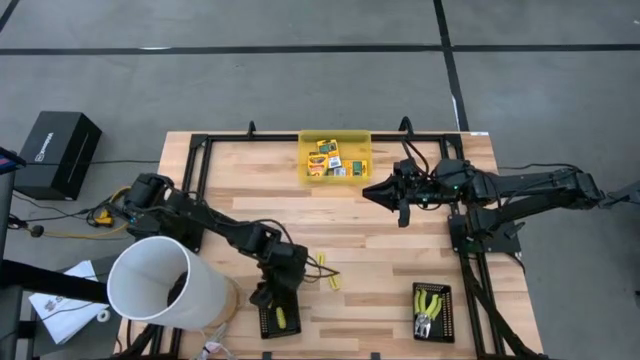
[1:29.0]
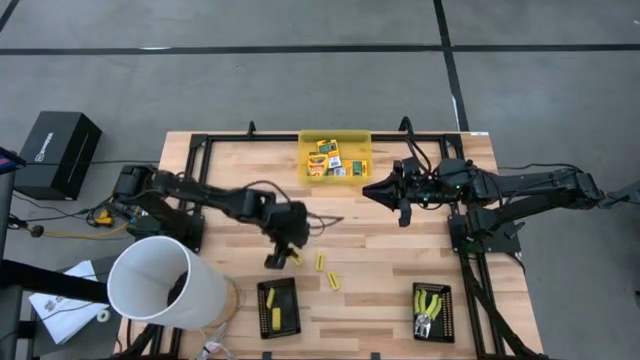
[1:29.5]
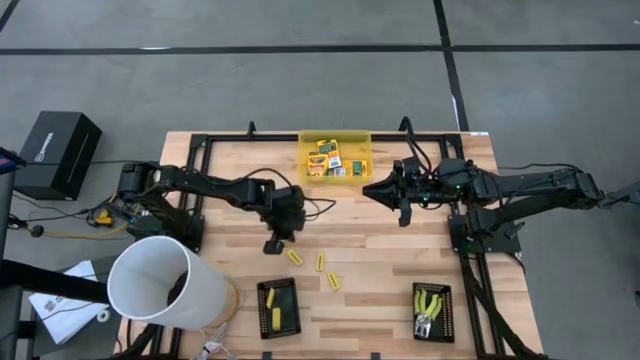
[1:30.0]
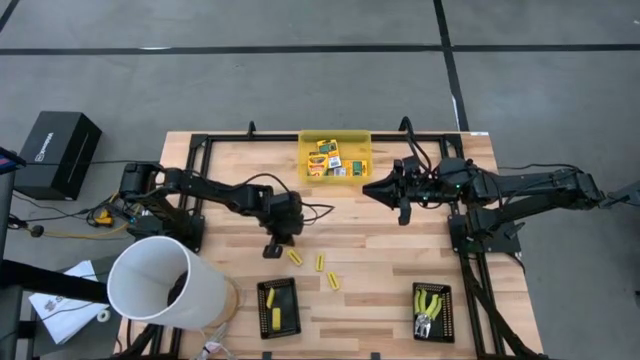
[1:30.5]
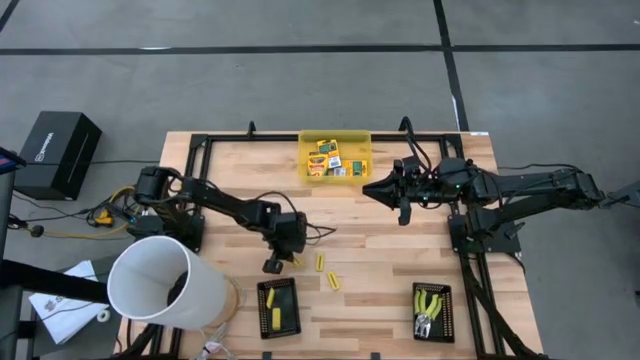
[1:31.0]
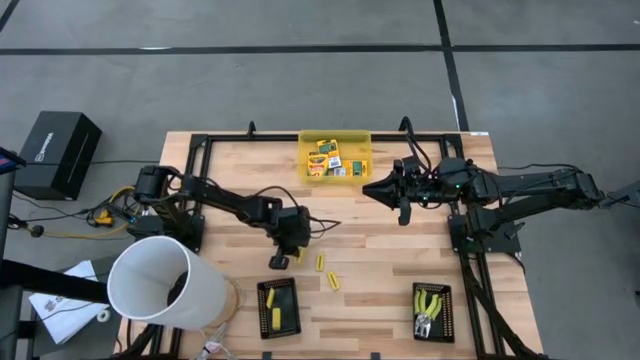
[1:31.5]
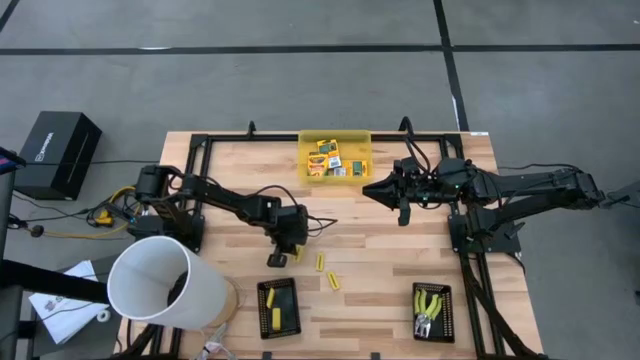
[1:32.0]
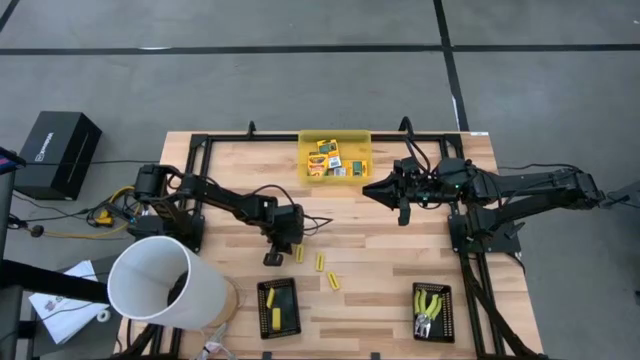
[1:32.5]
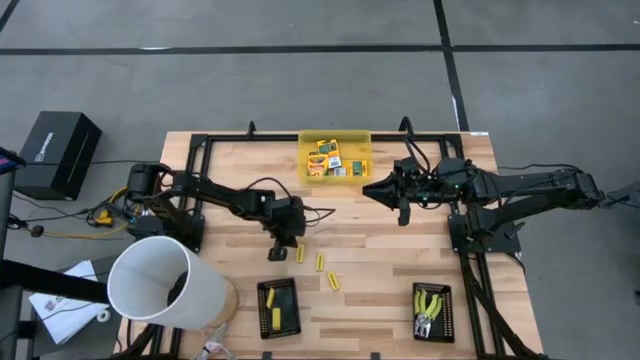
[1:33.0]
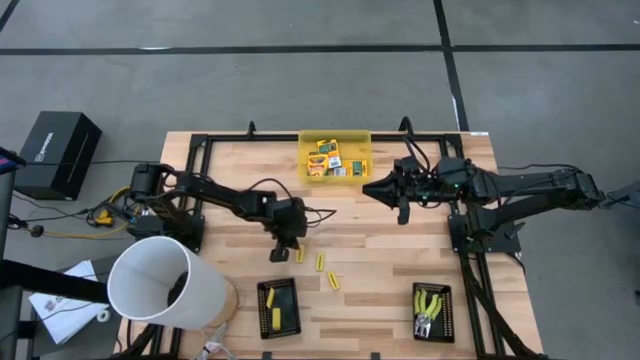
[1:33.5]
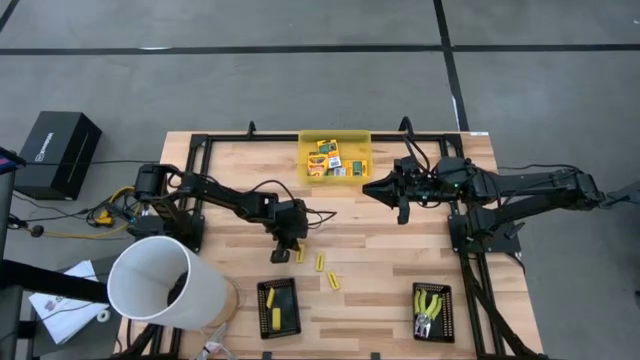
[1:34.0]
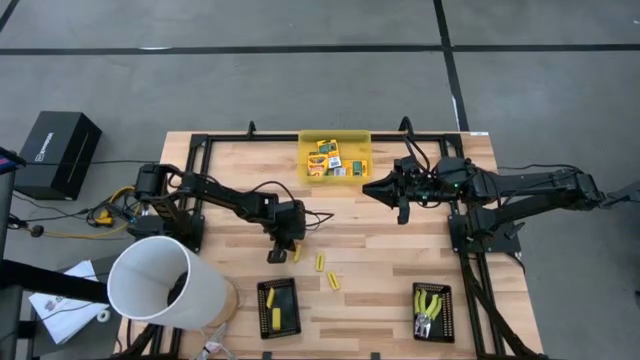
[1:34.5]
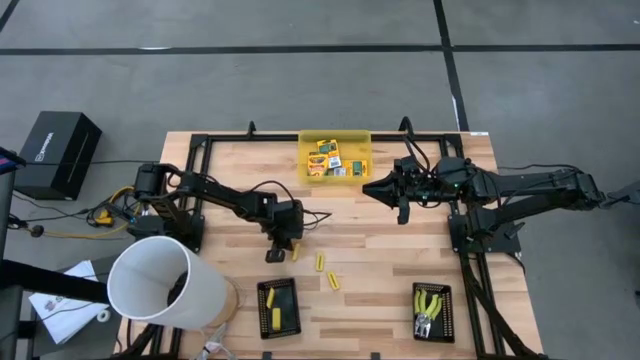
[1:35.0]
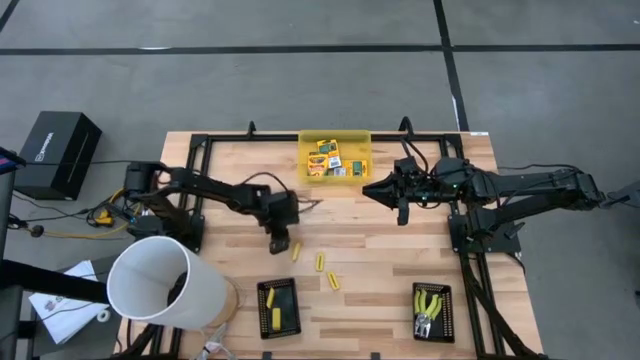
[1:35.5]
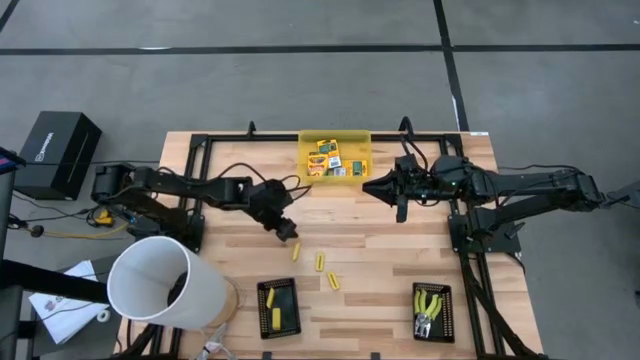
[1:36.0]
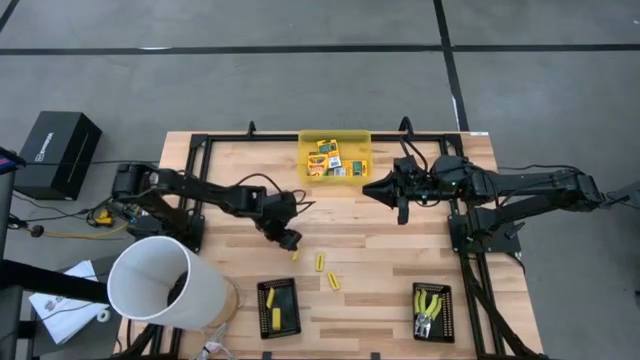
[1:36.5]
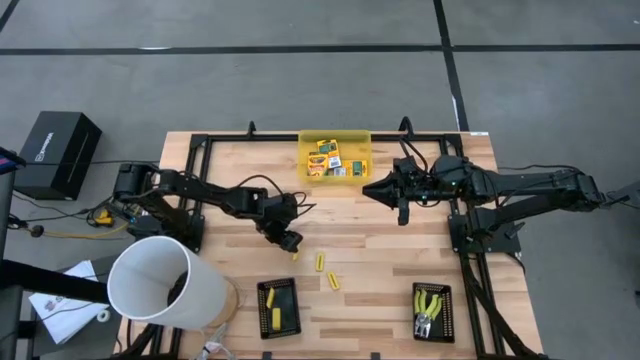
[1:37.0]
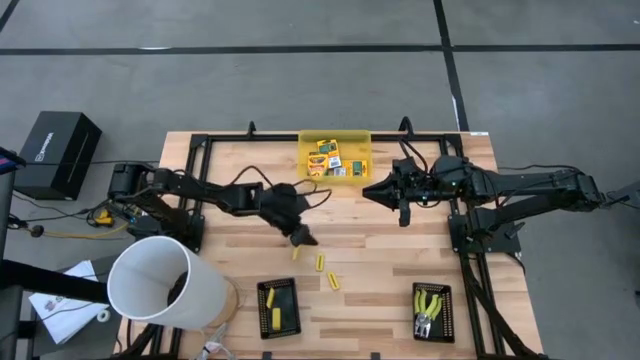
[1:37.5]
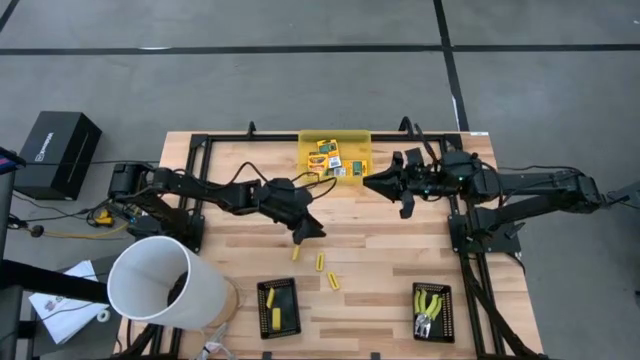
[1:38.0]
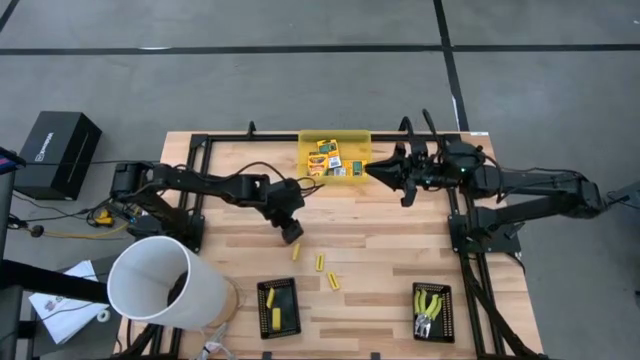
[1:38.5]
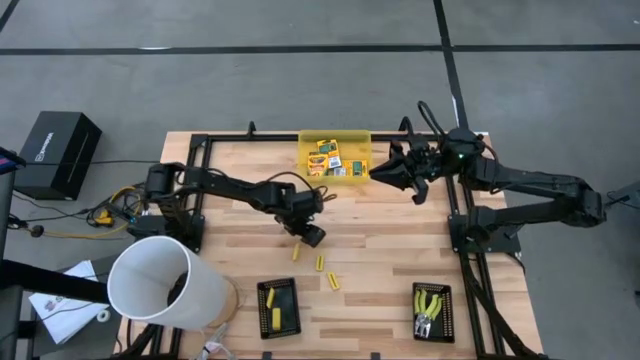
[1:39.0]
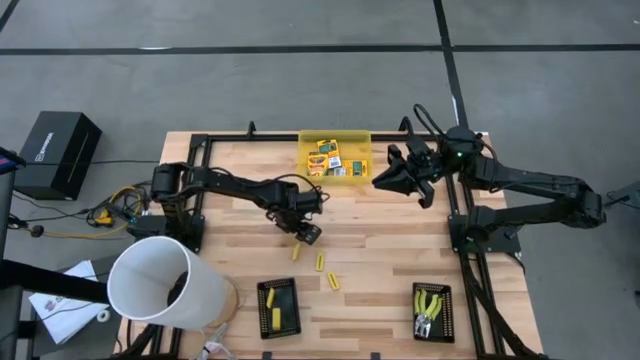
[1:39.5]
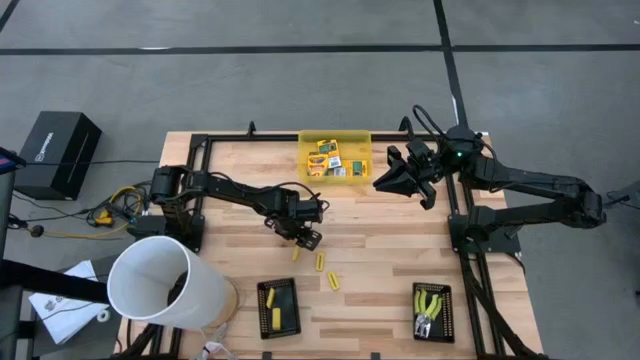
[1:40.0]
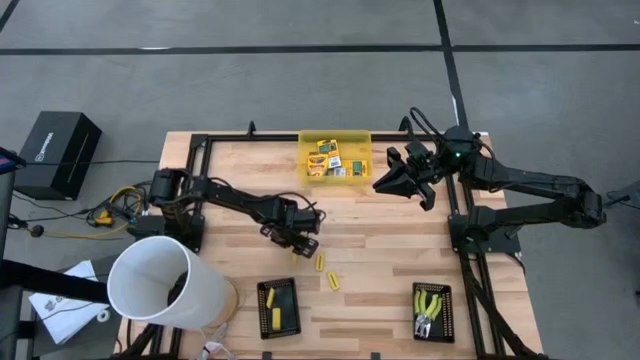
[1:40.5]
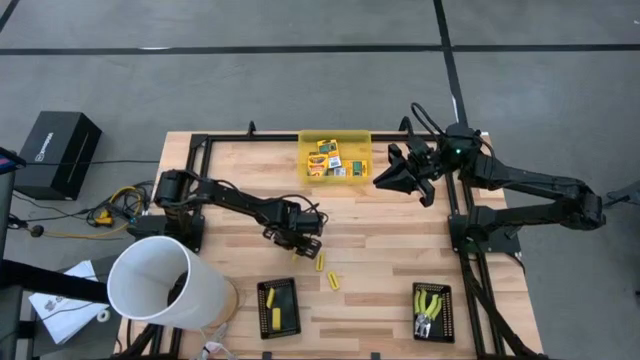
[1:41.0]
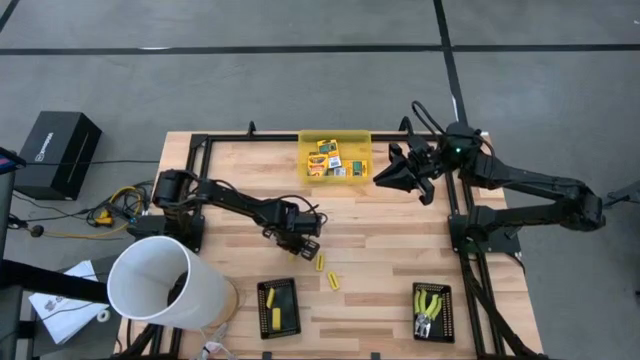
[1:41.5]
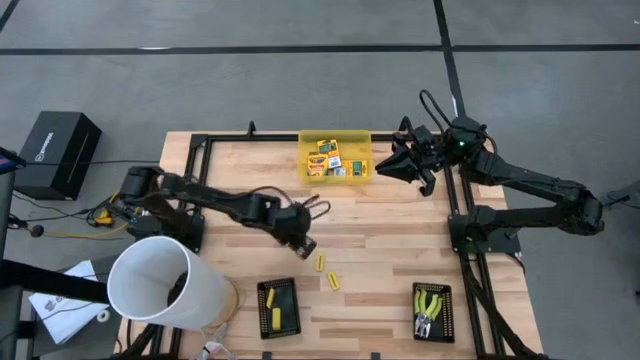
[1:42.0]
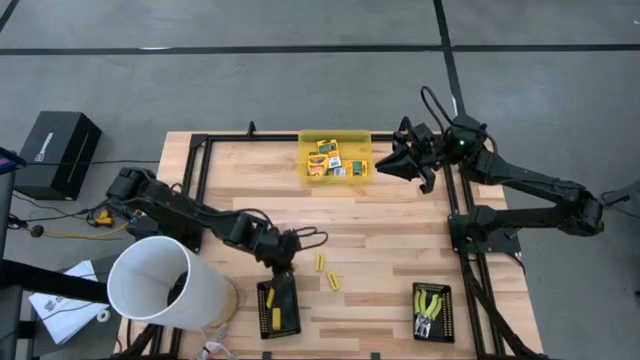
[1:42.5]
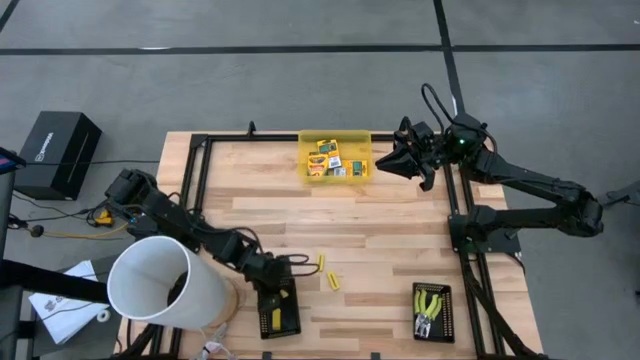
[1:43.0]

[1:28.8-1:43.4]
Task: Pick & Place School Supplies
Put the yellow eraser into the left black bin

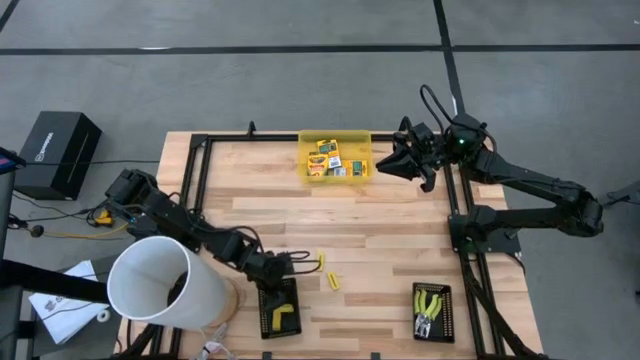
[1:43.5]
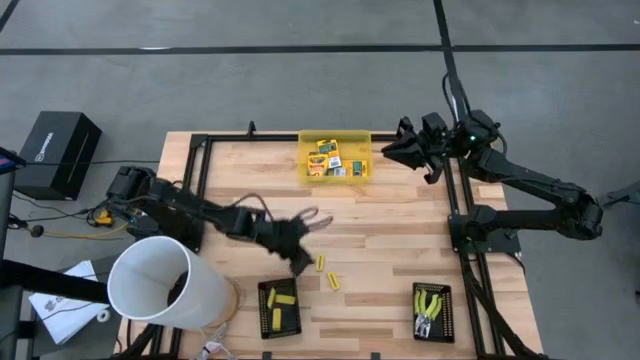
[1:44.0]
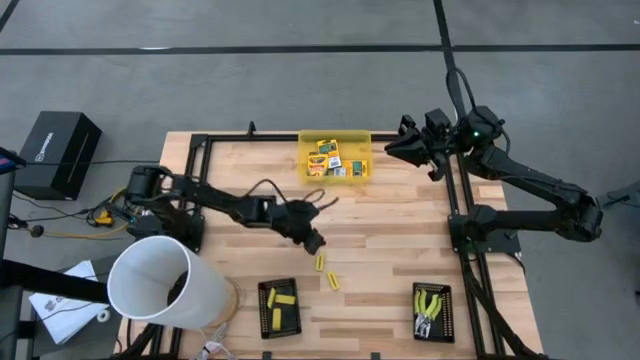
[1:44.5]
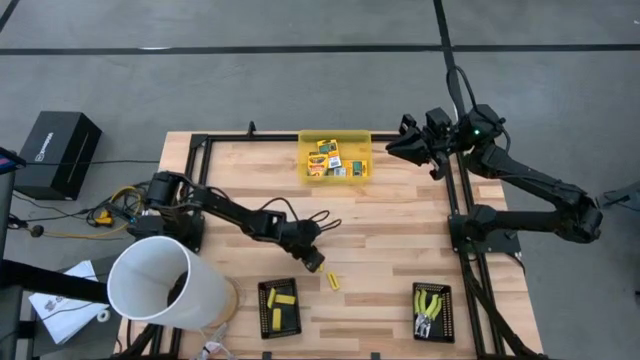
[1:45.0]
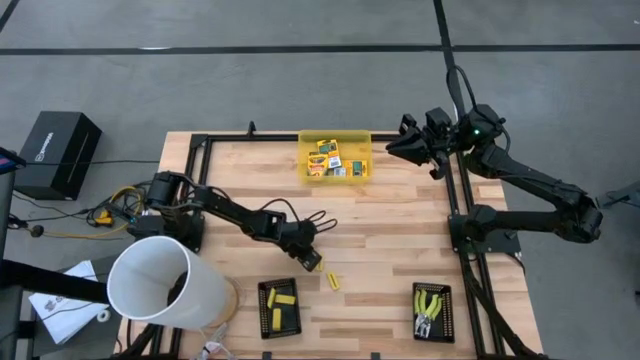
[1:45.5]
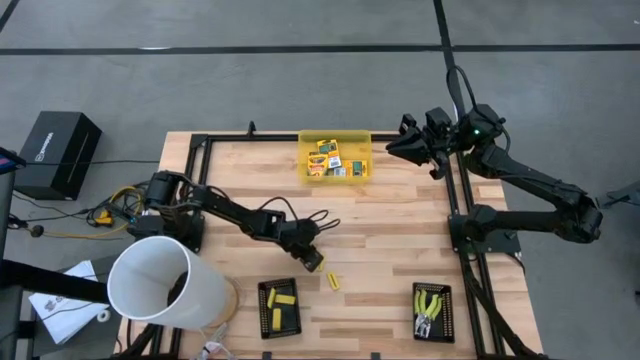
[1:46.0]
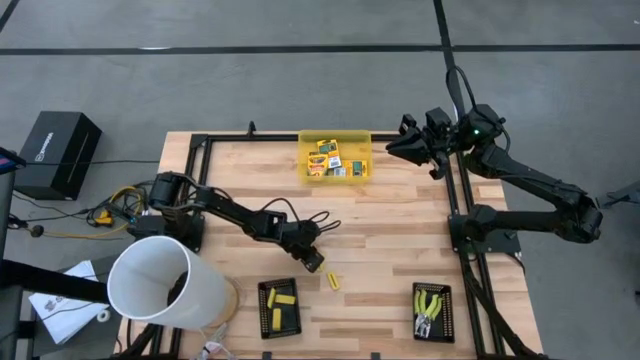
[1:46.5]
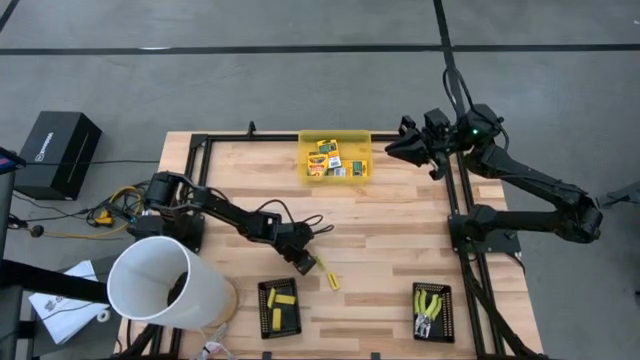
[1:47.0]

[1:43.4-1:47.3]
Put the yellow eraser into the left black bin

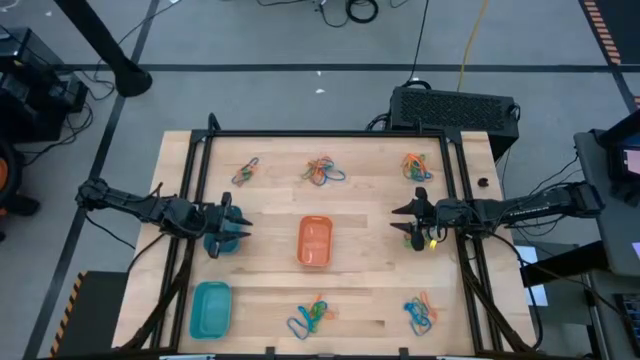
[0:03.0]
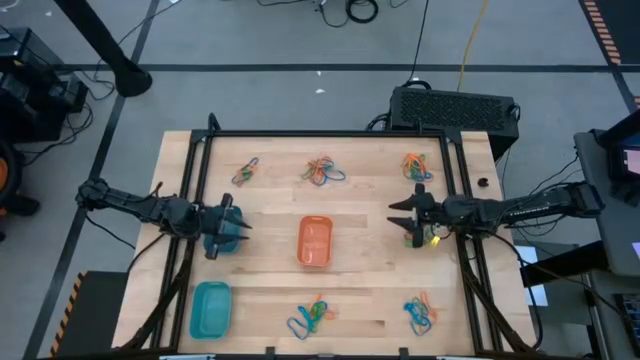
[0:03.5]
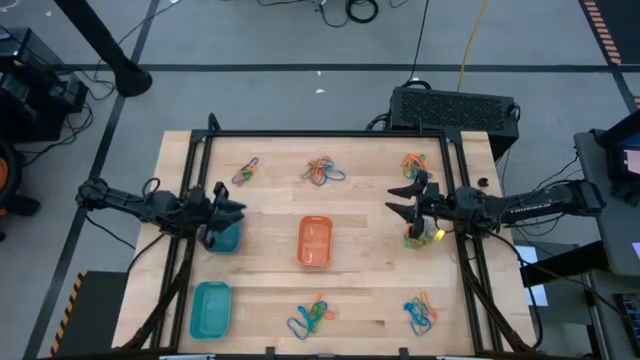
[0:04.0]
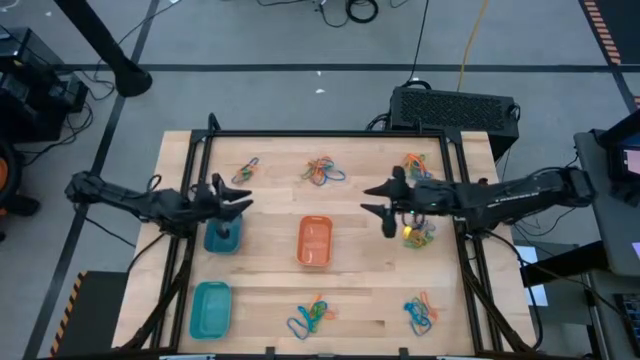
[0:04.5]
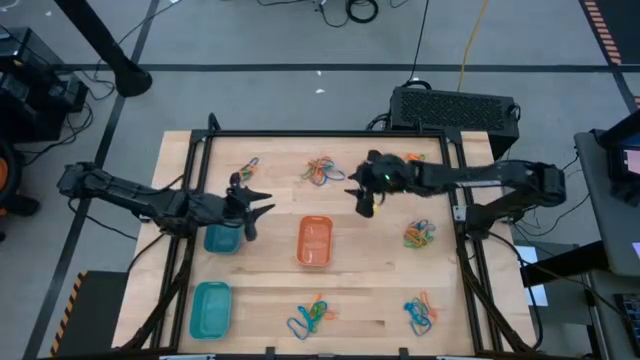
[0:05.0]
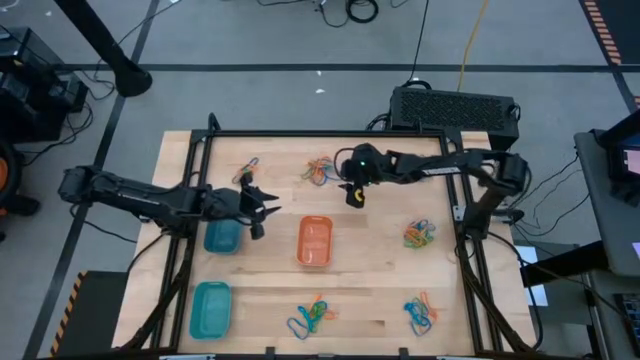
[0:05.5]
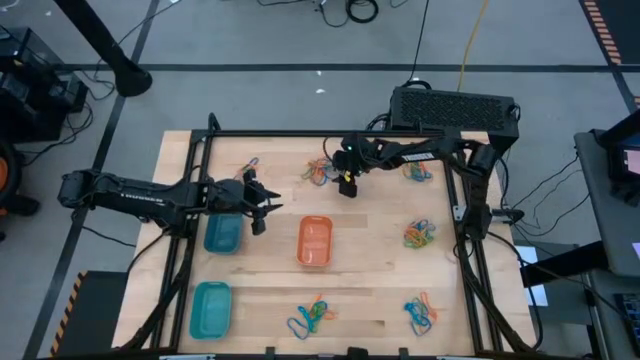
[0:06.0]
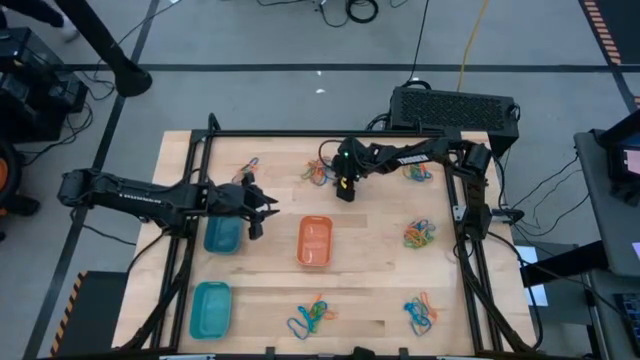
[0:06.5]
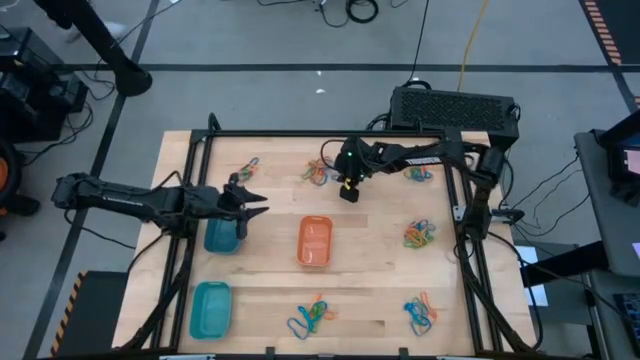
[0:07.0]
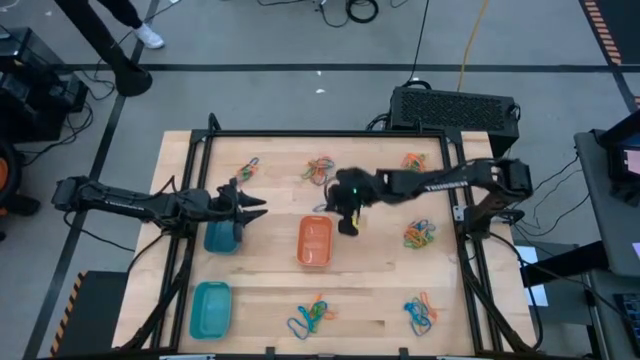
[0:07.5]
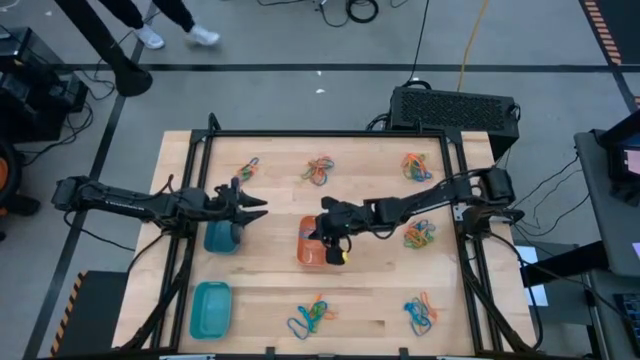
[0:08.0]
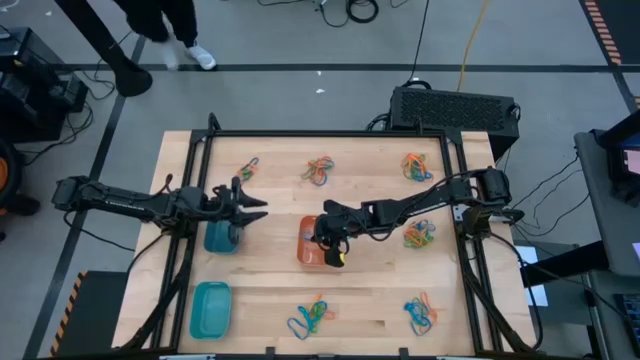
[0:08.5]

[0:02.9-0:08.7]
Task: Sort rubber bands into baskets
Put the blue rubber band into the orange bin
